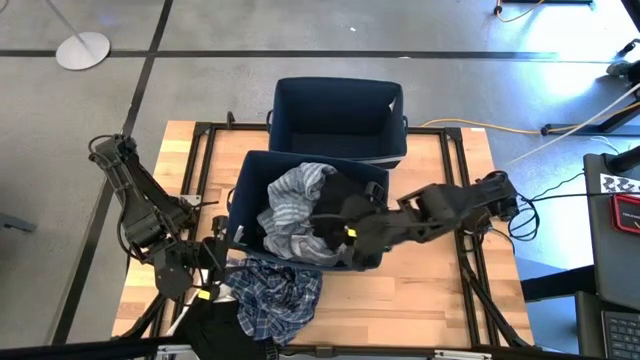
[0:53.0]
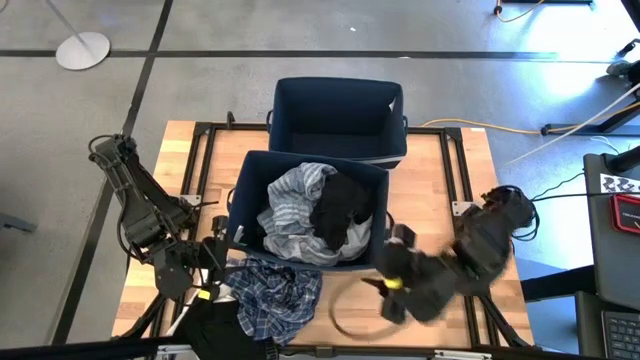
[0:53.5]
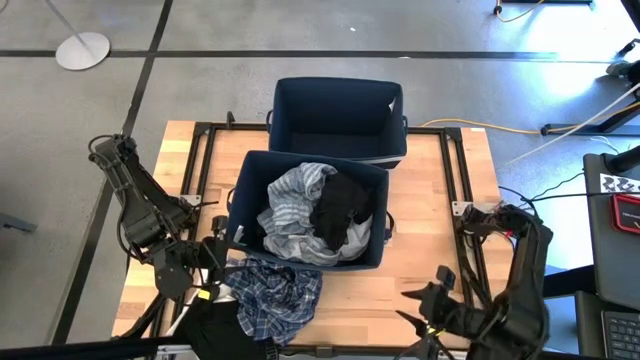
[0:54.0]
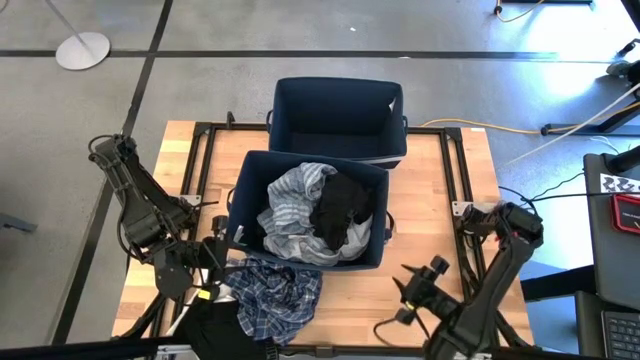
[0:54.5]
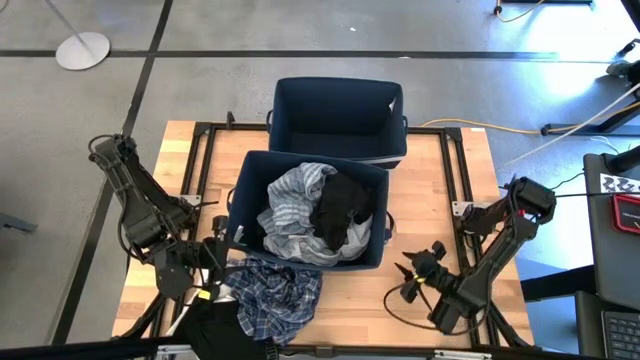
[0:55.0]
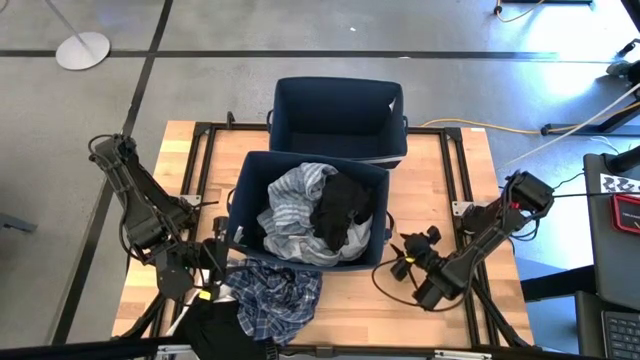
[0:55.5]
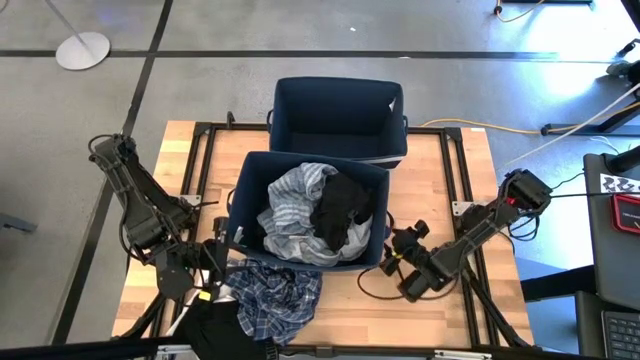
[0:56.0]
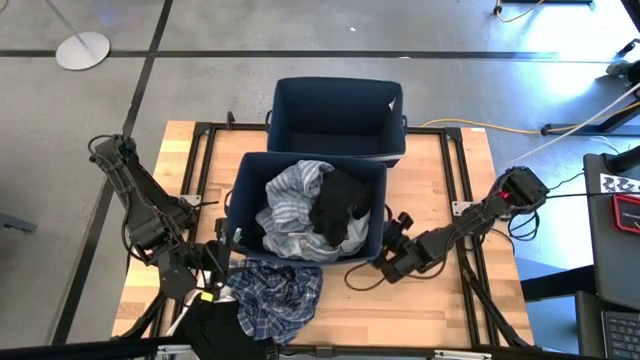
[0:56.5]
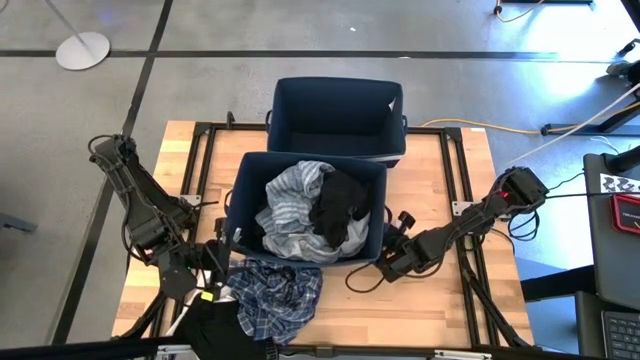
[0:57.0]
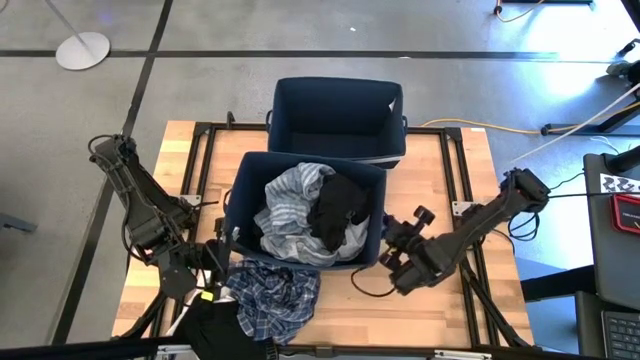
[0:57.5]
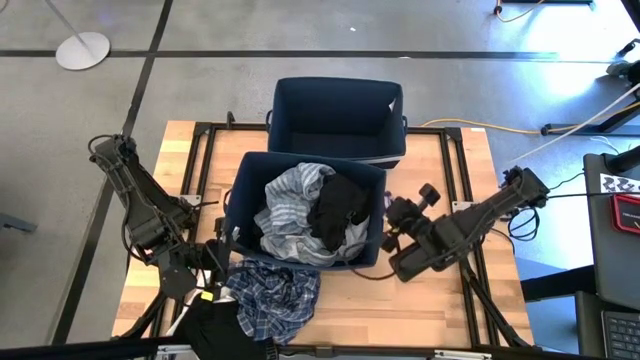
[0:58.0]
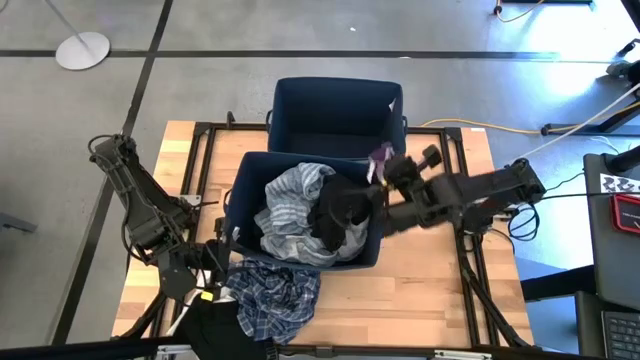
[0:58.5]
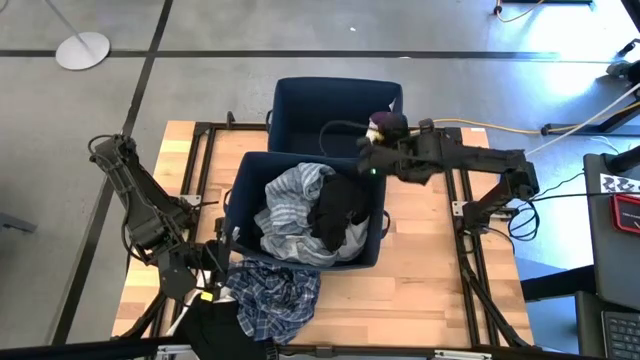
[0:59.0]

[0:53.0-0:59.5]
Task: Sort clothes
Put the violet socks into the top blue laundry bin

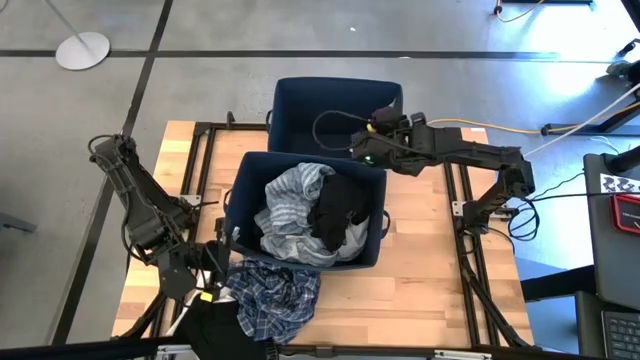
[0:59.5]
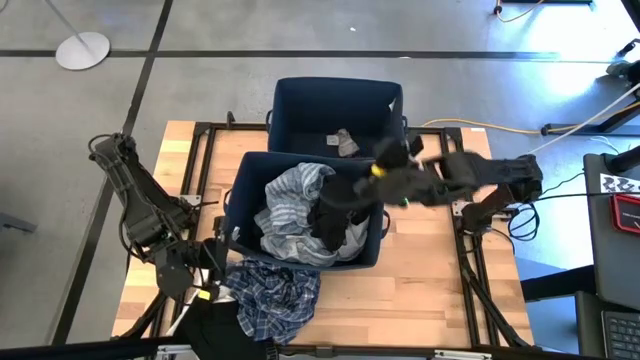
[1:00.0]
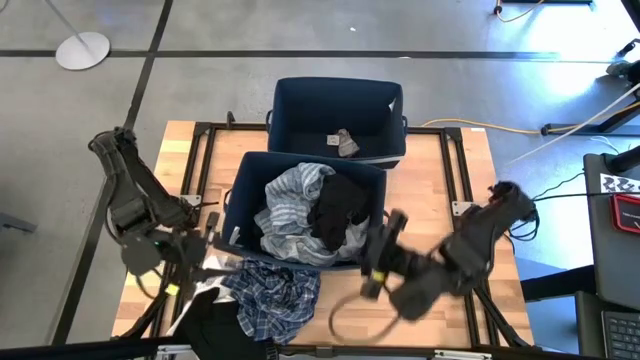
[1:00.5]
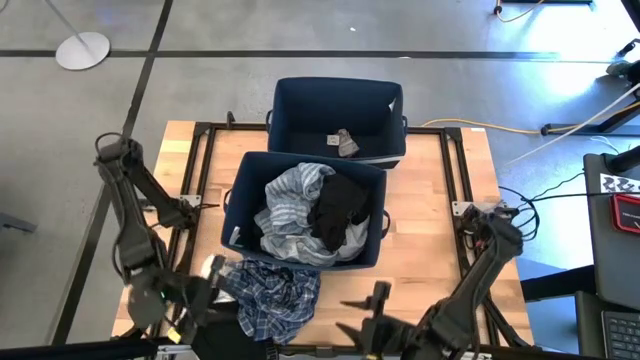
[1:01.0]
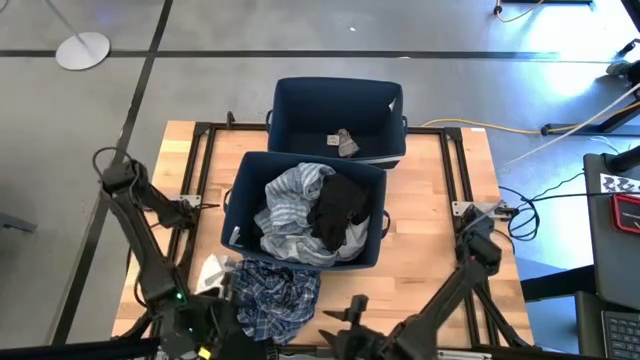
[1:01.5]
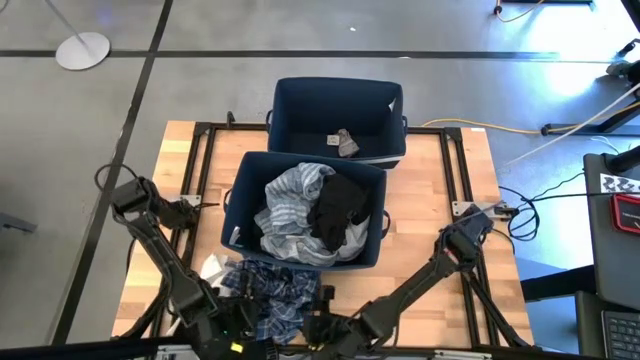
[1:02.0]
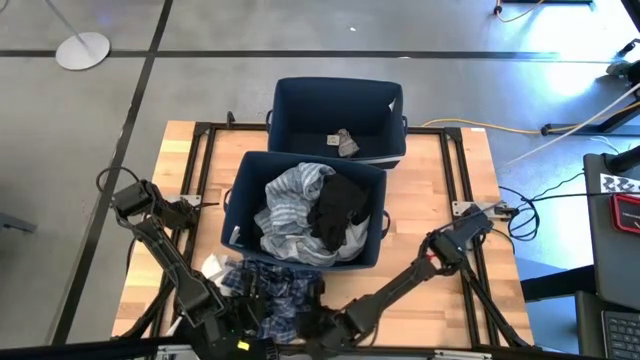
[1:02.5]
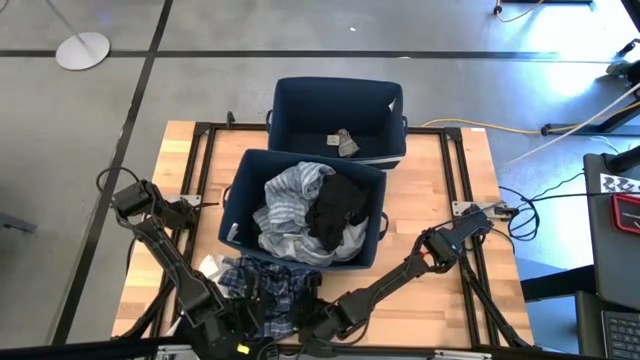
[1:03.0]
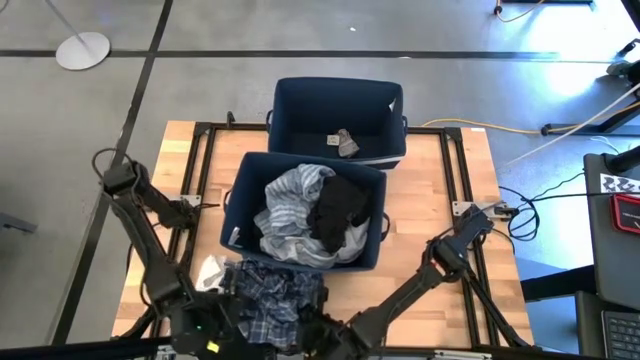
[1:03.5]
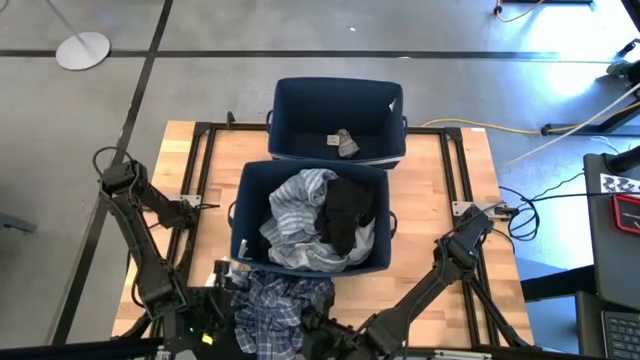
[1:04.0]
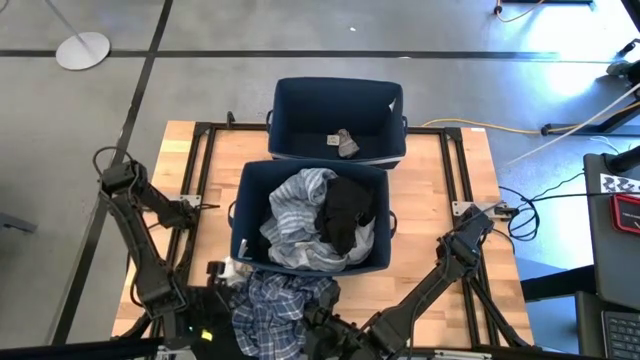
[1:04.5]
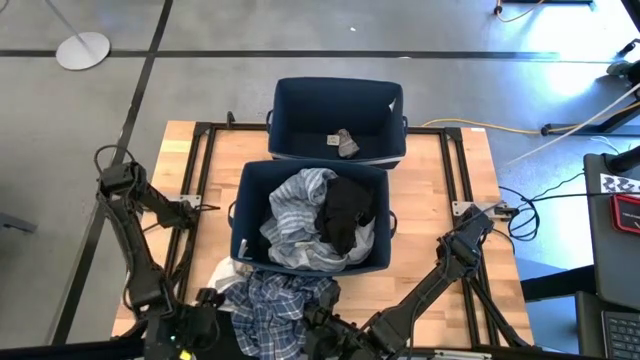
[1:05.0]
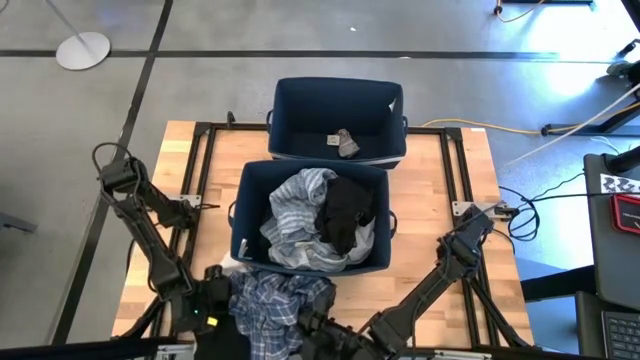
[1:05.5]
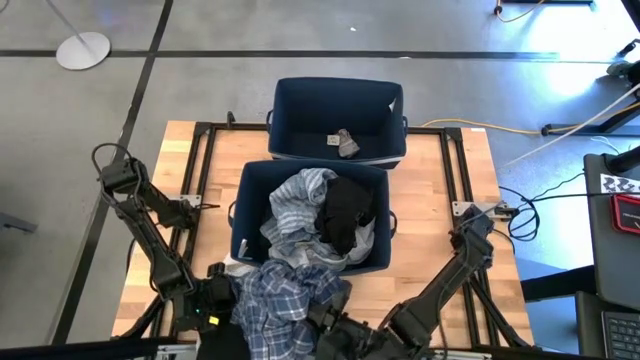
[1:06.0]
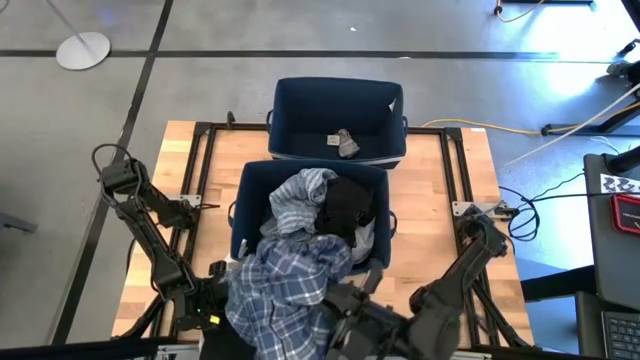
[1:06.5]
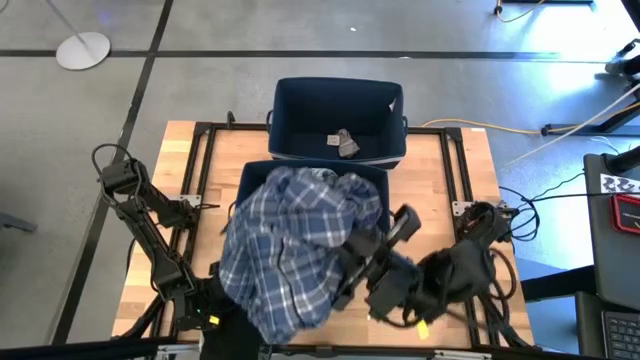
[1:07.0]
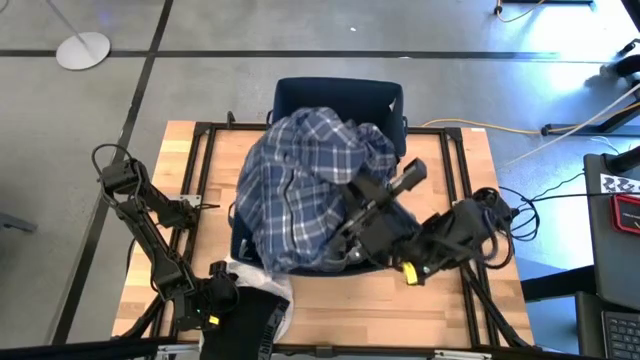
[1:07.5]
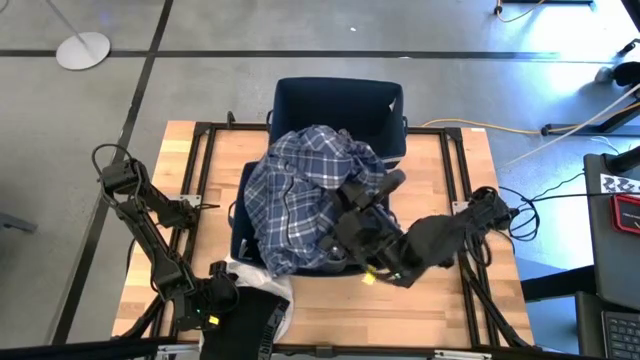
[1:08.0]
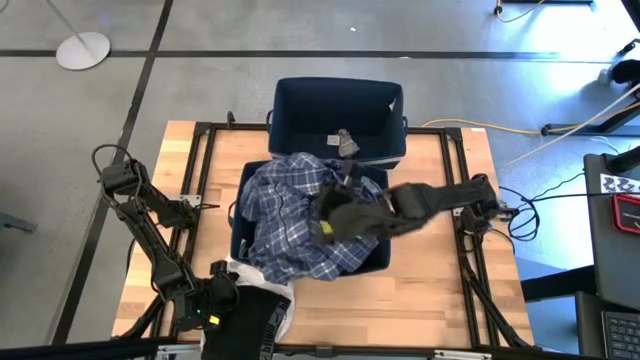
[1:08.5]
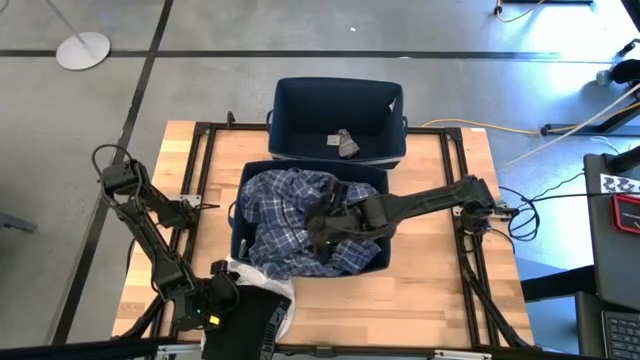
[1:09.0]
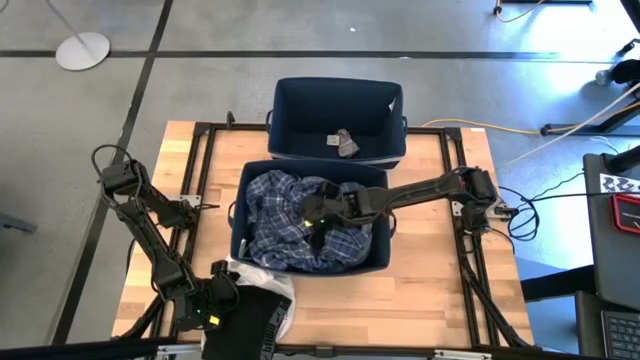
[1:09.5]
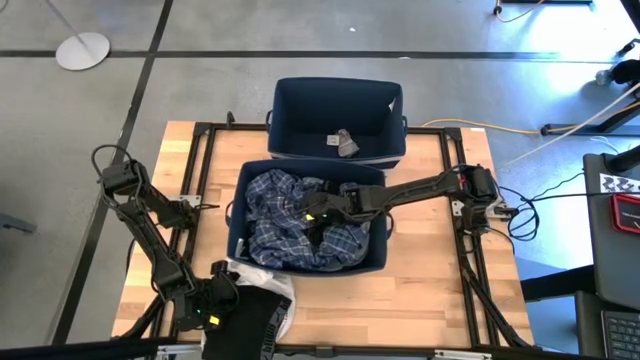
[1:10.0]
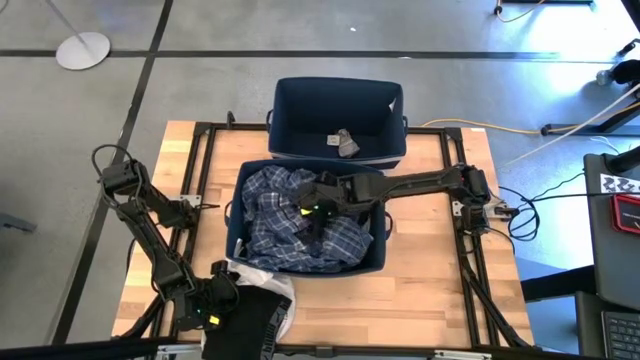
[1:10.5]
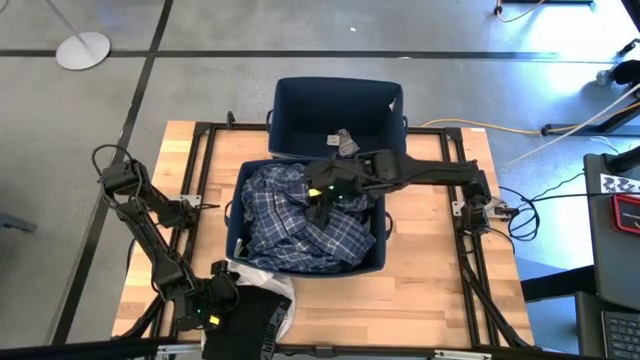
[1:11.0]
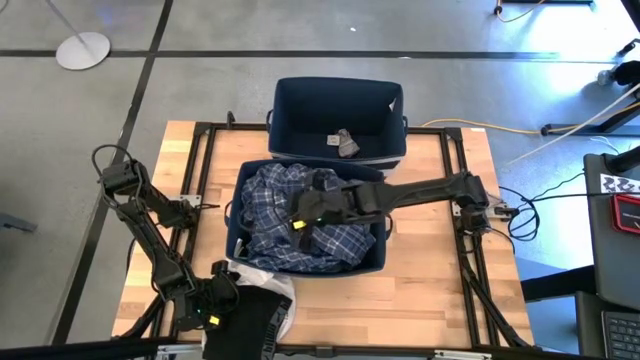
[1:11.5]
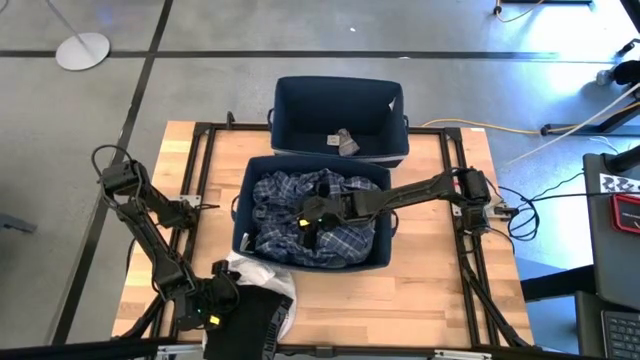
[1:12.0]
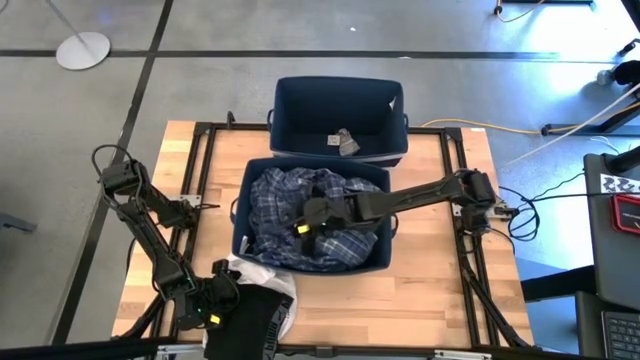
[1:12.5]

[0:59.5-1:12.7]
Put the blue polo shirt into the bottom blue laundry bin
